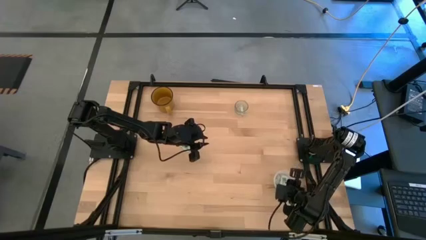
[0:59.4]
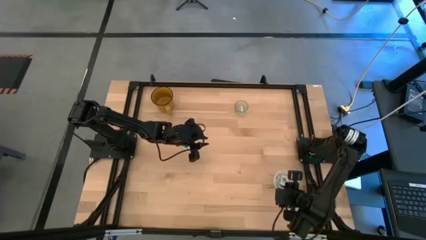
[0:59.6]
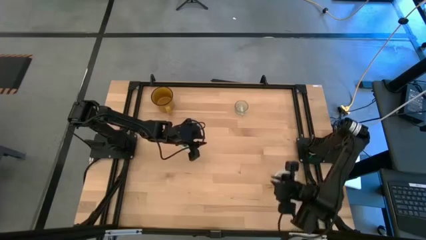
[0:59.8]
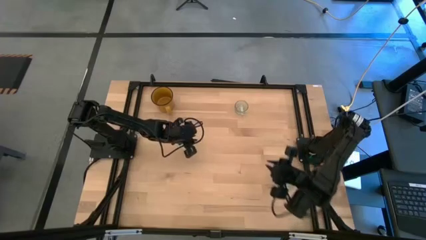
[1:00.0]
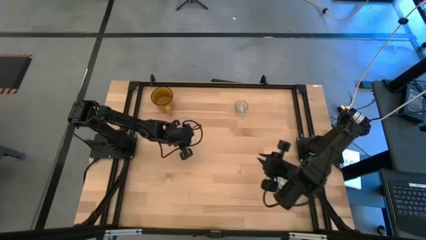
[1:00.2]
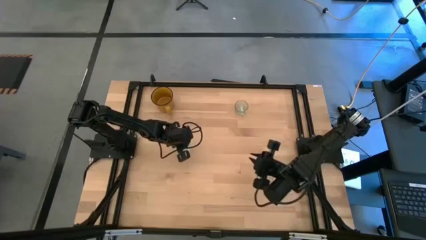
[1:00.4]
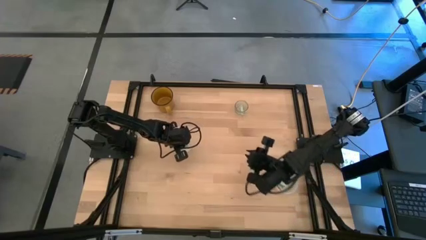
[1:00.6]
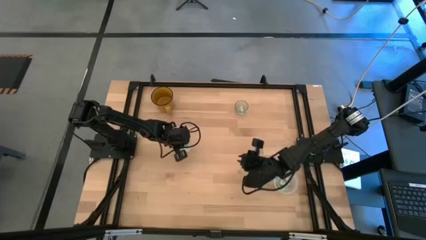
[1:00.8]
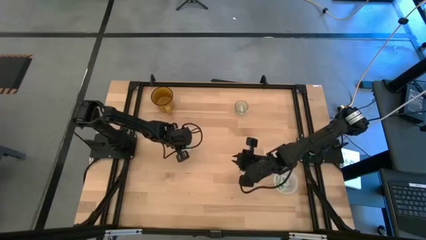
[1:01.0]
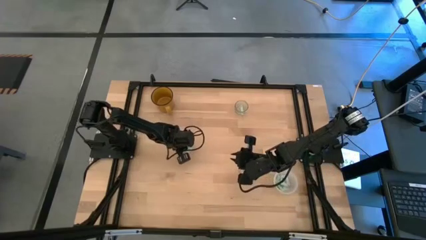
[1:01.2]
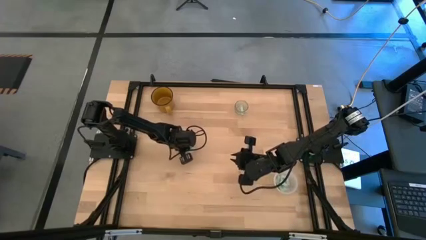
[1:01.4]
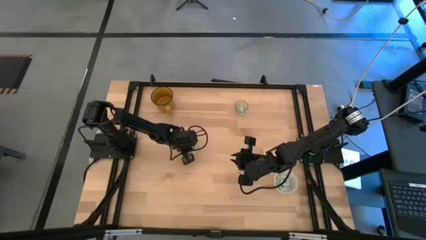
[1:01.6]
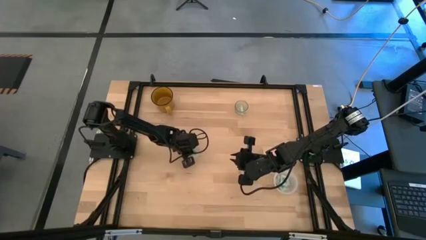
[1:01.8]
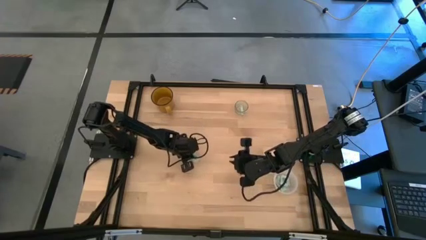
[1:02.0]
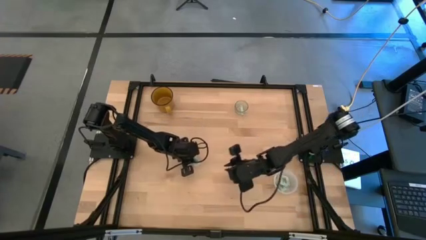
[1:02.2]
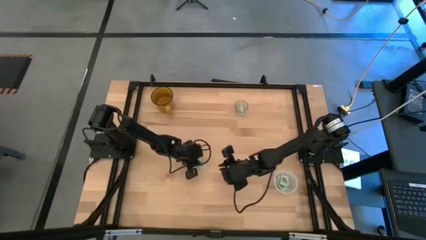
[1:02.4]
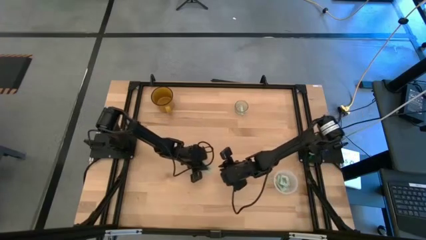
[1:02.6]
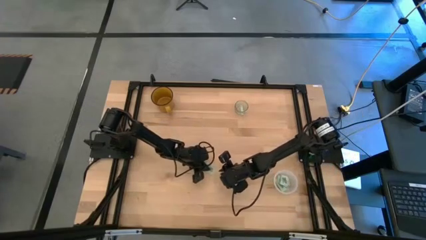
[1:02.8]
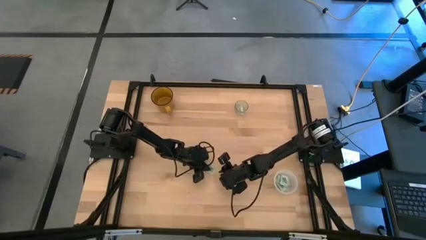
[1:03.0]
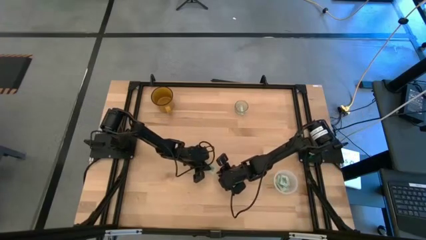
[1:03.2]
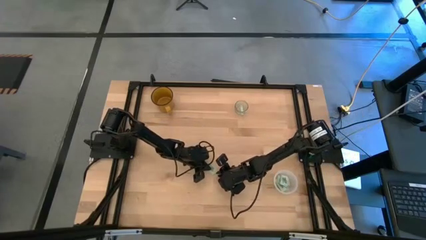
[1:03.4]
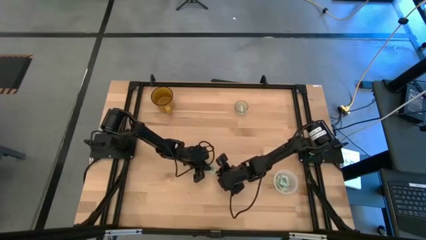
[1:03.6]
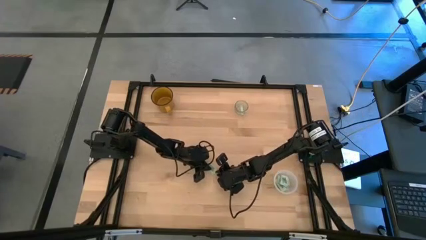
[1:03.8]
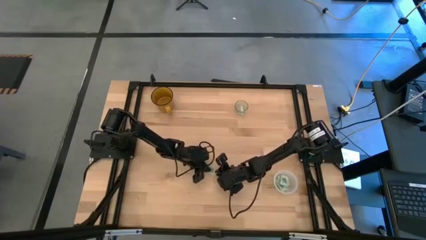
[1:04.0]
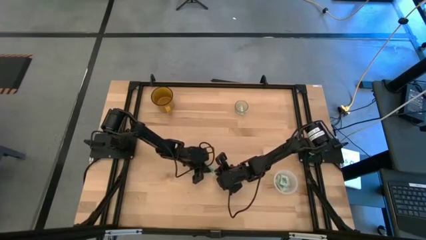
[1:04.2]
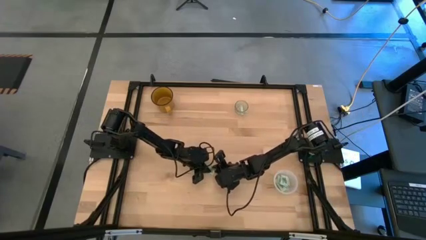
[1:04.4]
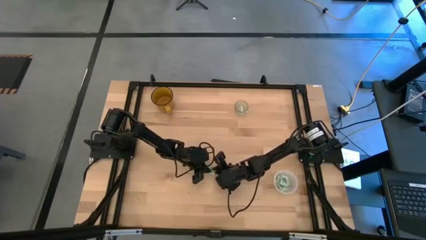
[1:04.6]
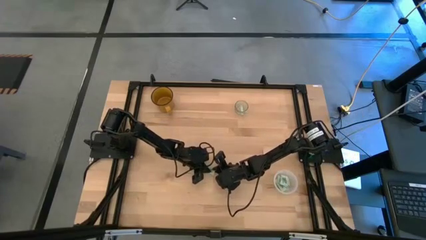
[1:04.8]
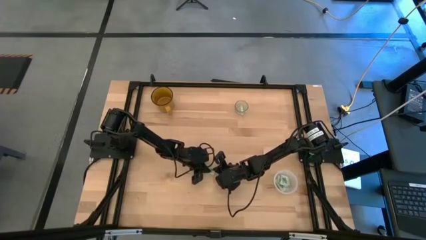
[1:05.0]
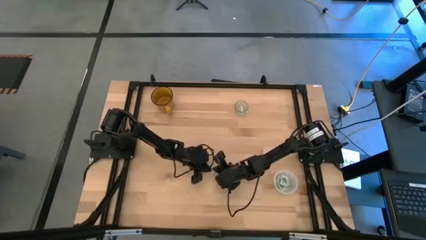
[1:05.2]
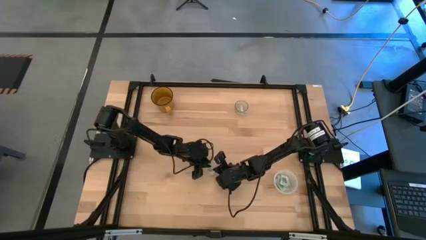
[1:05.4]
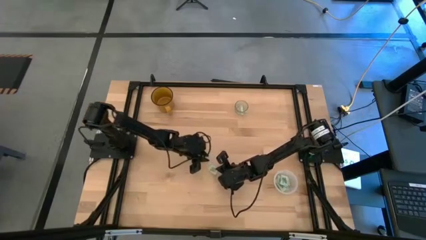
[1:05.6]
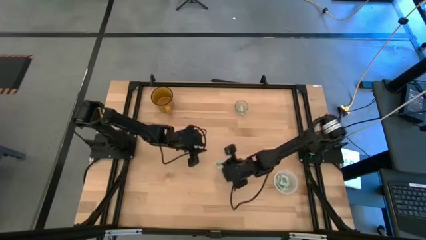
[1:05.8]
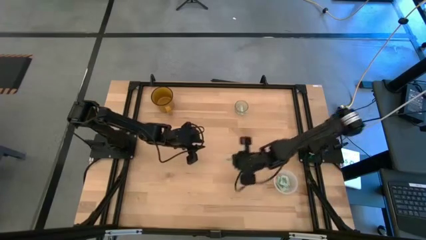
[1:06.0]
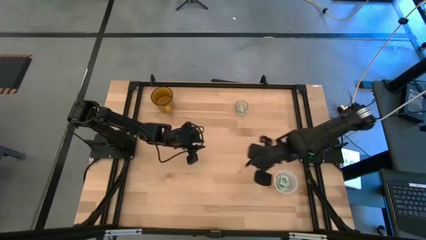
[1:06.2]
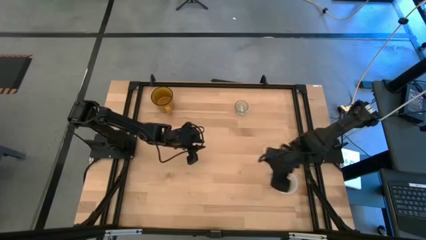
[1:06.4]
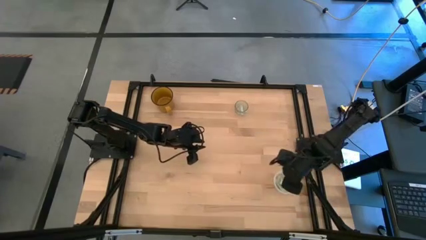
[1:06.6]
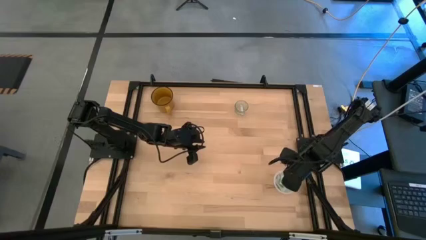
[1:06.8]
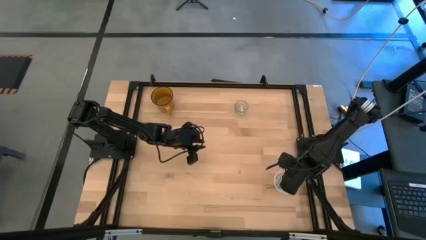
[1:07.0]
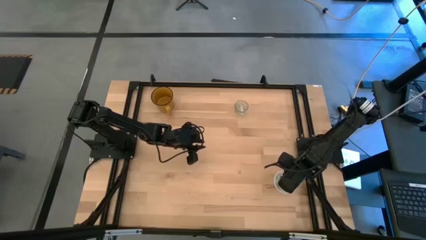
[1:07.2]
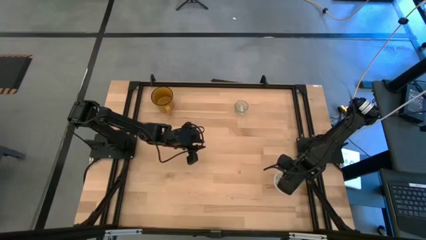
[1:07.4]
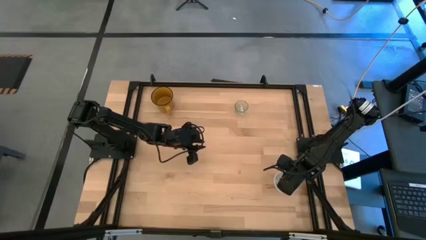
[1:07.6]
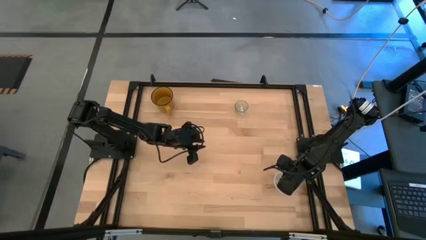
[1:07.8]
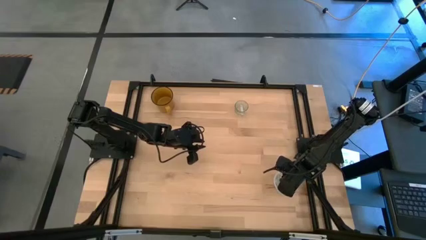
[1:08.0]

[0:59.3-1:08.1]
Task: Pick and place Stevia / Truvia into bins
Put the stevia packet into the transparent container

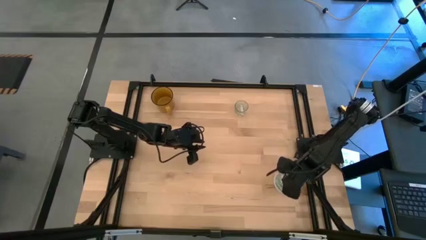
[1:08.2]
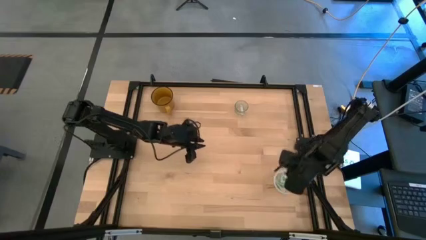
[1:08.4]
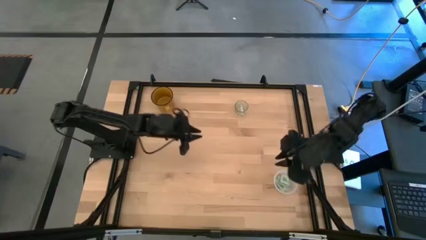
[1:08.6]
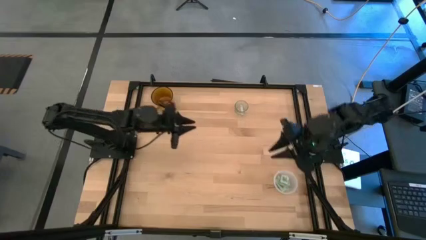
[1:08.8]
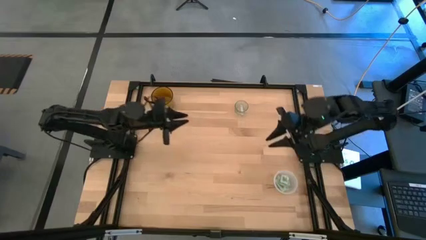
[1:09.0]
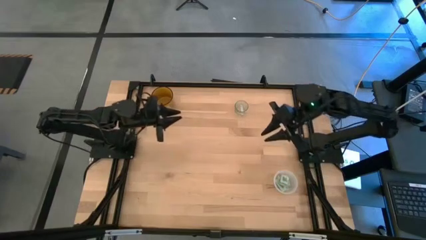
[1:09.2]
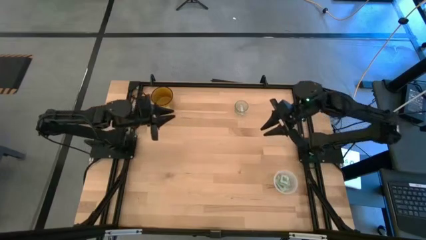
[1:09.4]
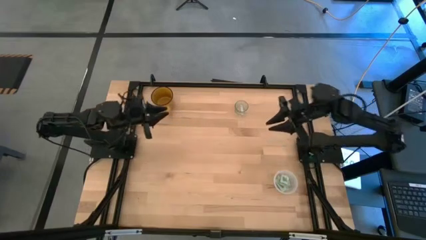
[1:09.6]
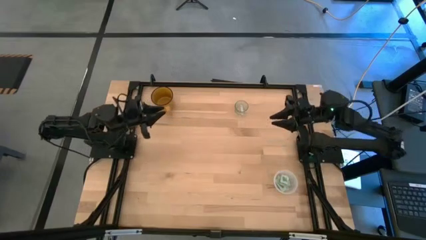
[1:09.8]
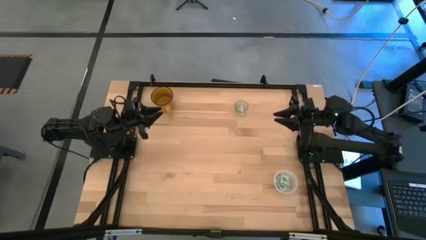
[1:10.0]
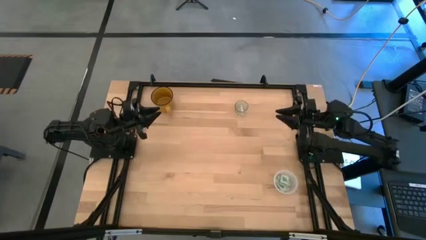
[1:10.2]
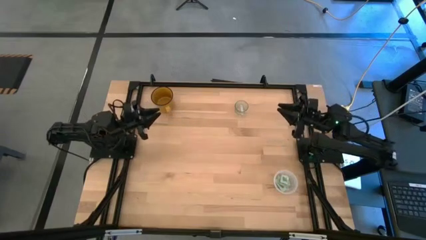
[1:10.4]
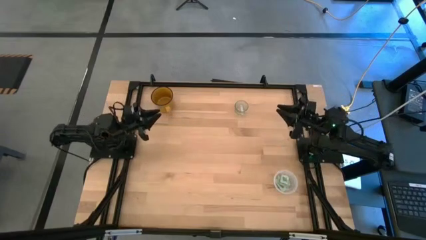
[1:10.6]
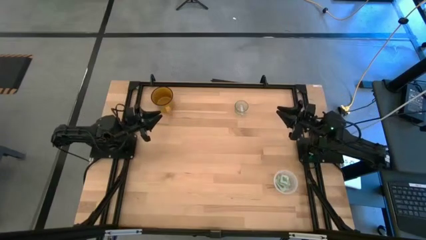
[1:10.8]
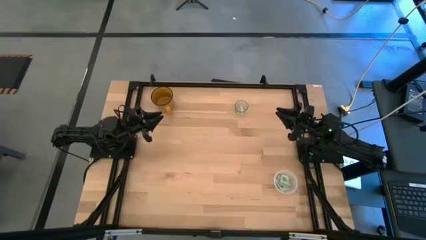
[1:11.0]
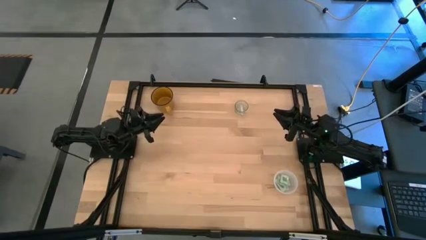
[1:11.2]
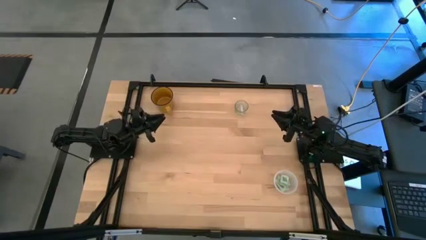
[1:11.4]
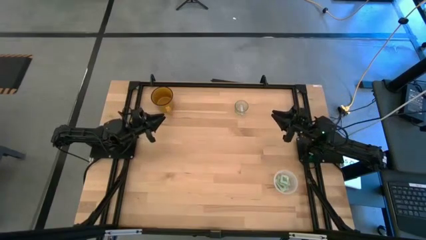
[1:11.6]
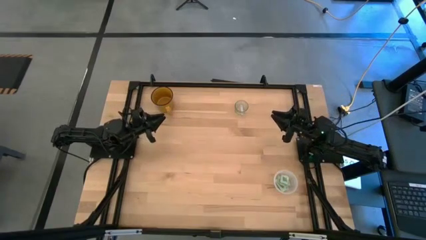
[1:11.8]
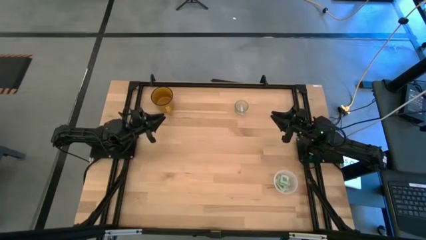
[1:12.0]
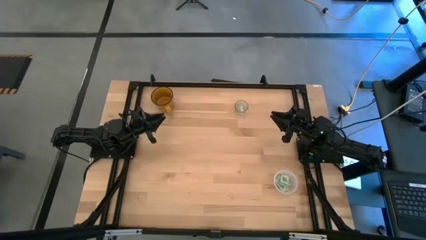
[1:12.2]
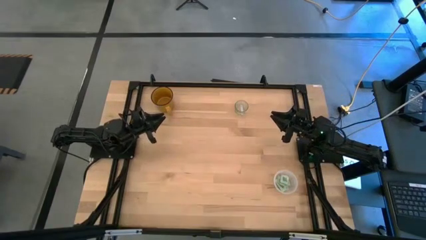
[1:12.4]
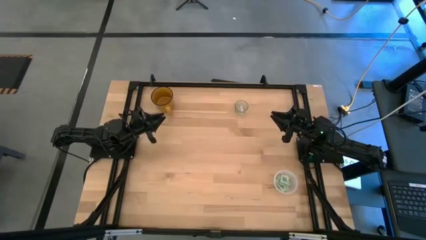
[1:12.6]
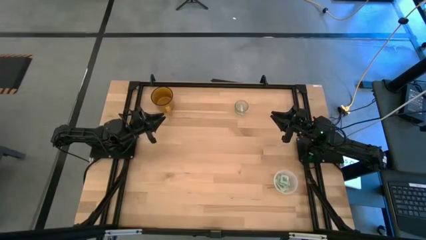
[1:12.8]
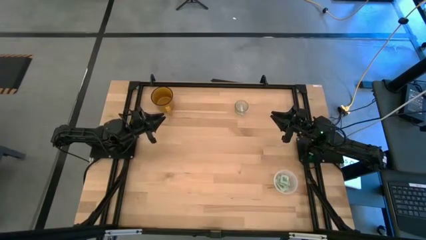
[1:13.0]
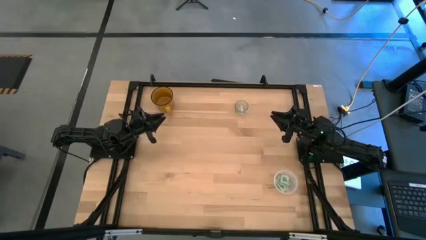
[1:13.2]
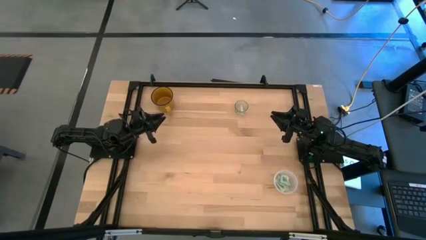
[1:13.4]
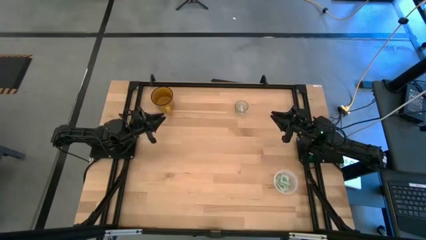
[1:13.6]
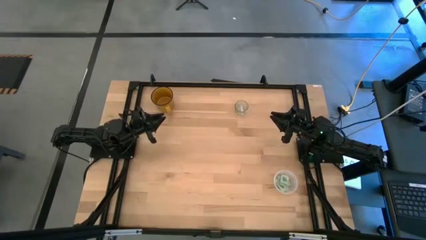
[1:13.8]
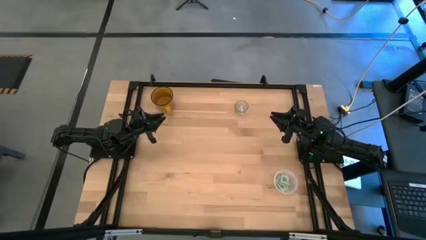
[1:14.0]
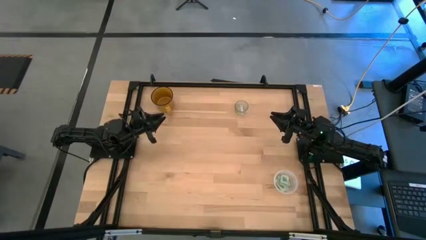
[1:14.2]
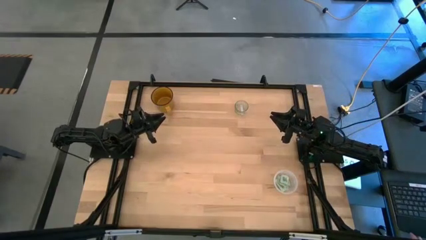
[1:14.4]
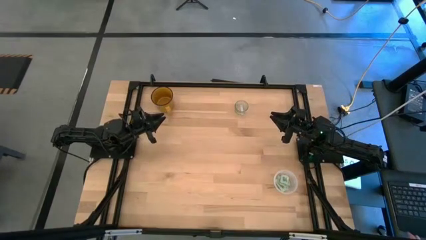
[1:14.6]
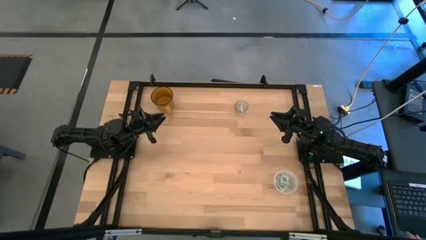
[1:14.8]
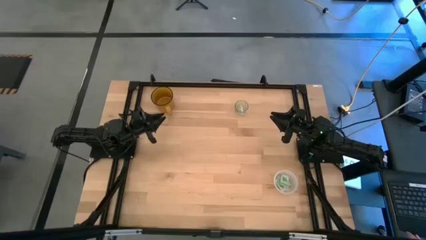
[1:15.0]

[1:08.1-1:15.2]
Return to Home Position

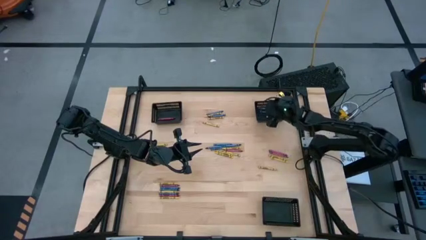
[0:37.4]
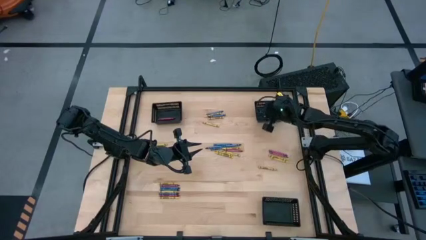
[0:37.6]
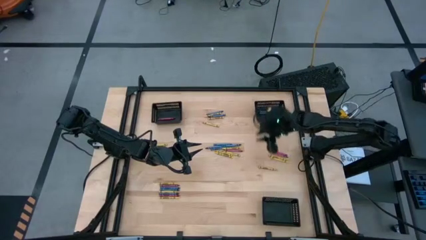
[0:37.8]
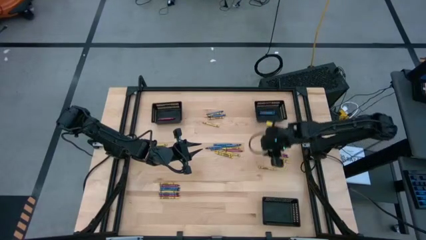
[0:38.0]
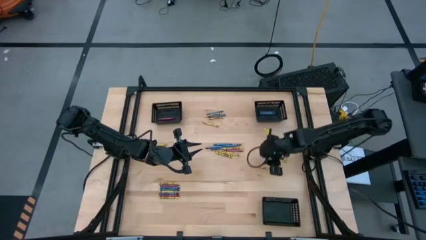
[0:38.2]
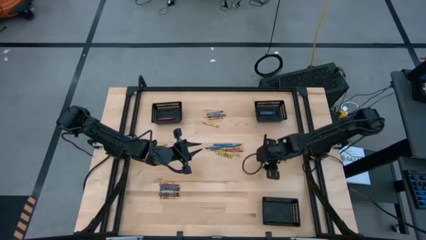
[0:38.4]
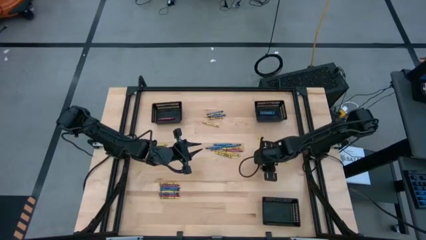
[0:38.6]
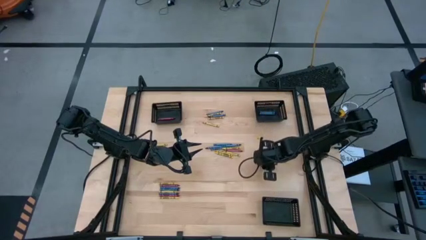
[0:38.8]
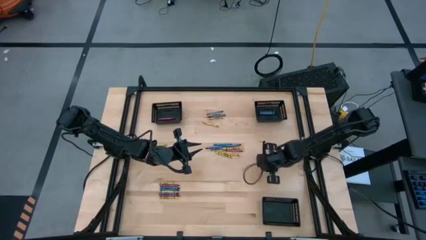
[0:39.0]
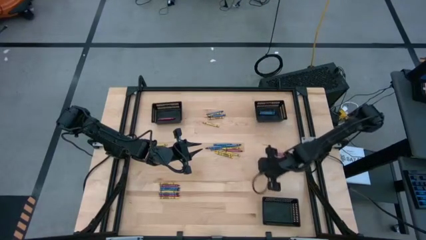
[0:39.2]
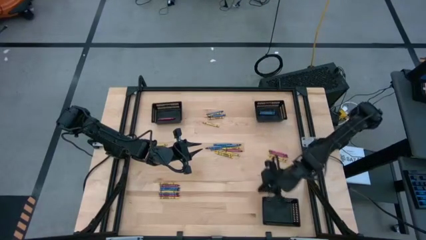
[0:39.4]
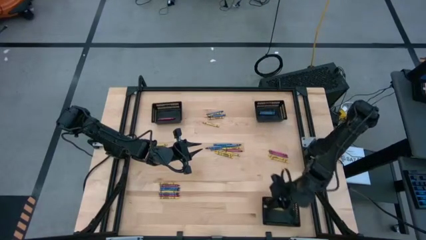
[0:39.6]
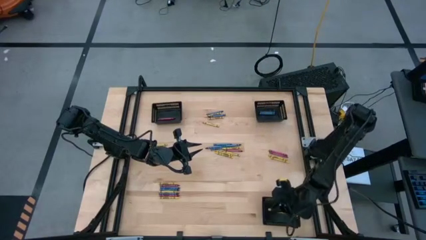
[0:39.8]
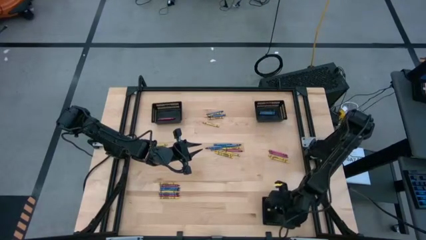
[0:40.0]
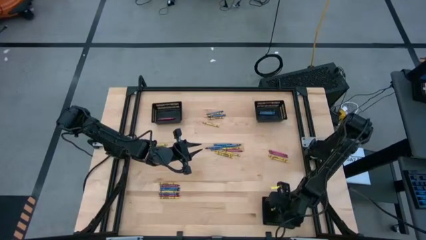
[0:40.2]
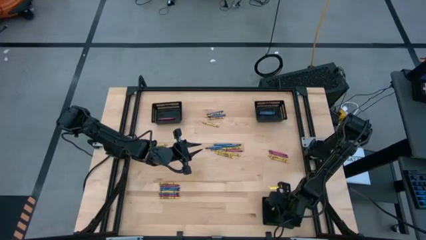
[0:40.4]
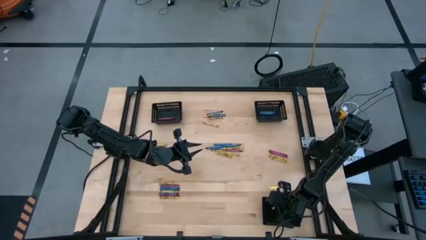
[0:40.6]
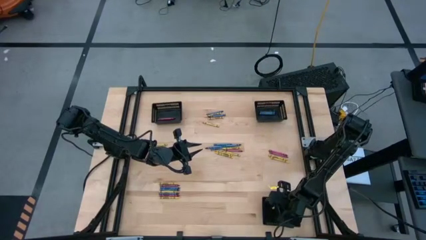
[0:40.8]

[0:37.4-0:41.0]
Task: Sort crayons
Put the yellow crayon into the bottom black bin
